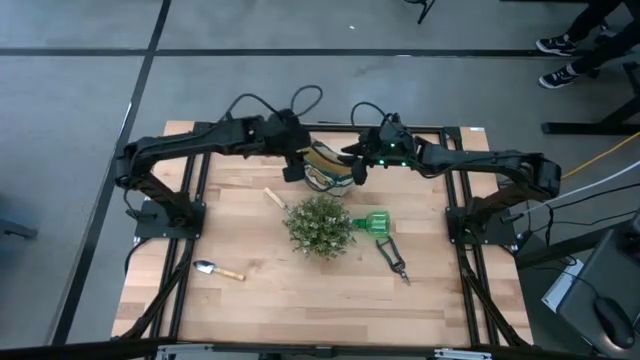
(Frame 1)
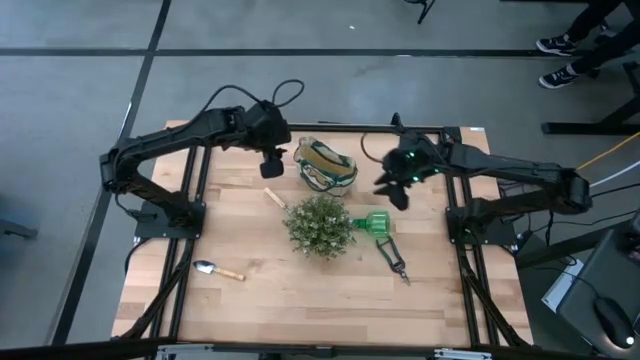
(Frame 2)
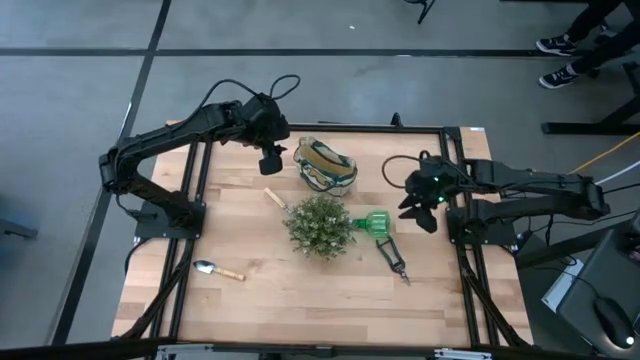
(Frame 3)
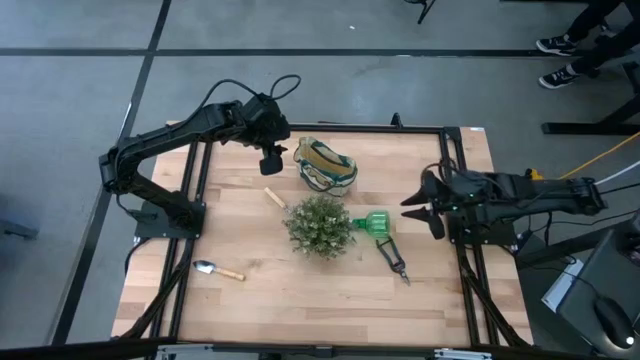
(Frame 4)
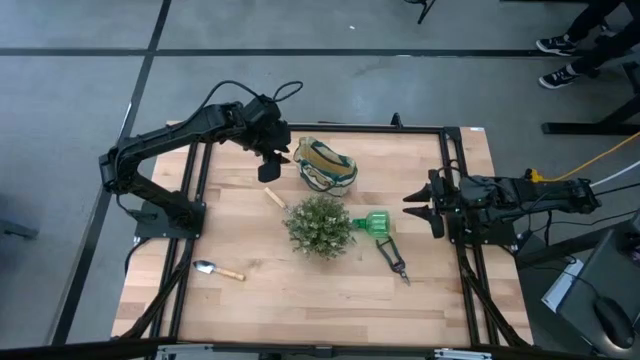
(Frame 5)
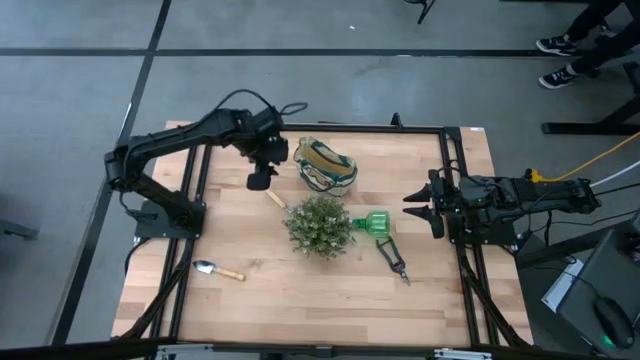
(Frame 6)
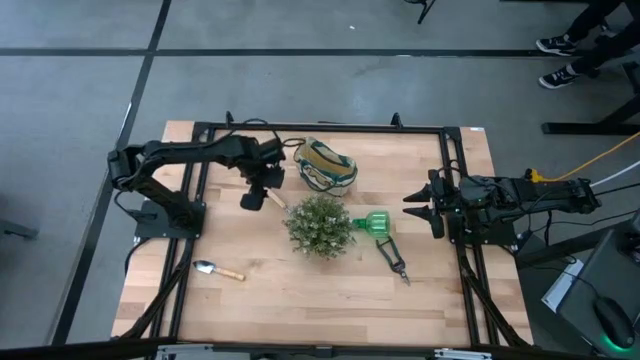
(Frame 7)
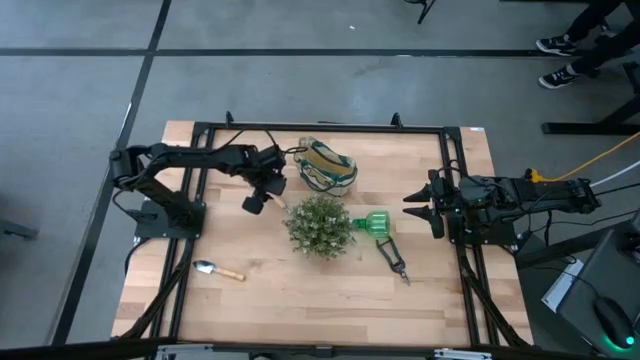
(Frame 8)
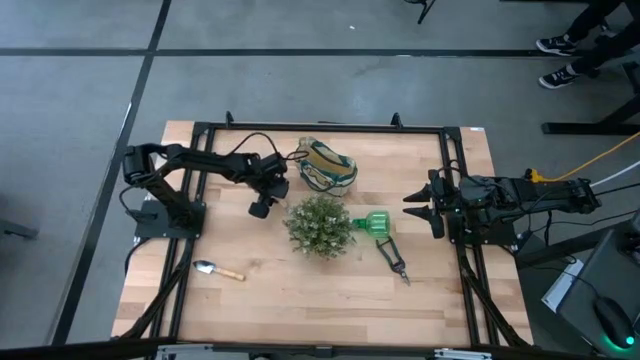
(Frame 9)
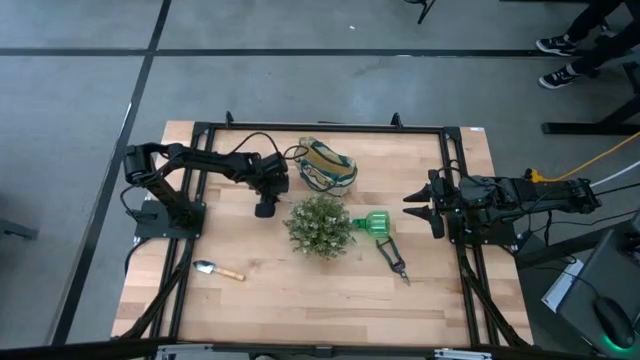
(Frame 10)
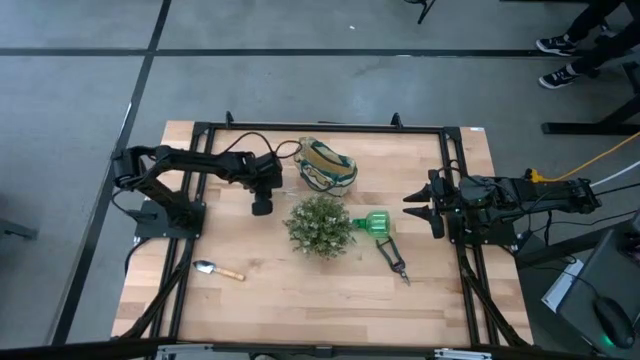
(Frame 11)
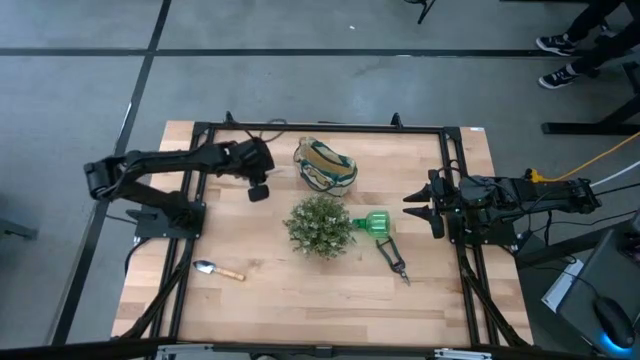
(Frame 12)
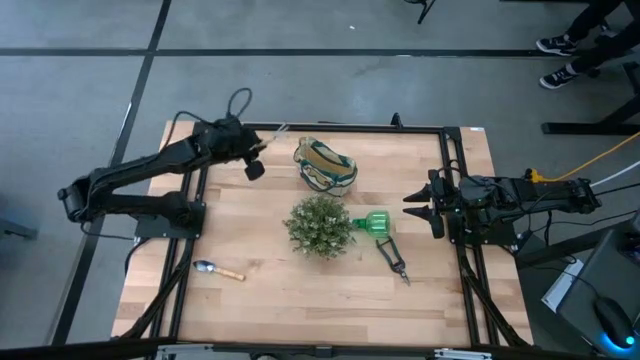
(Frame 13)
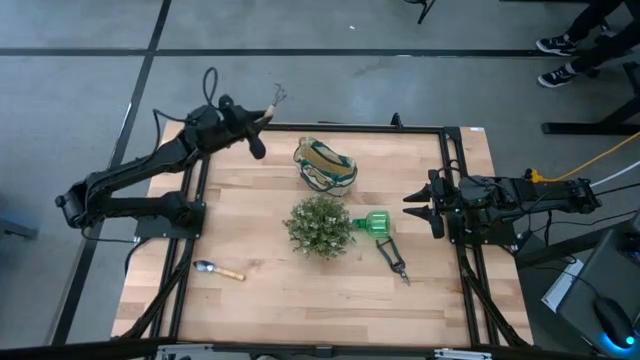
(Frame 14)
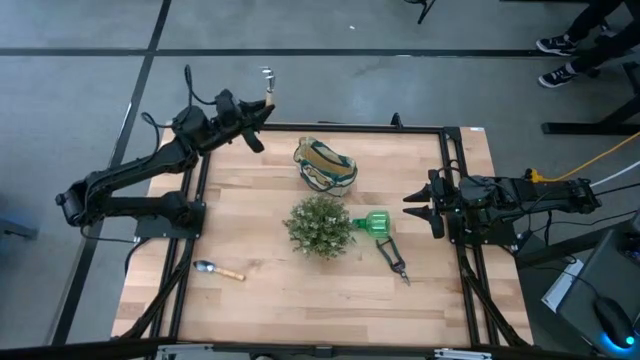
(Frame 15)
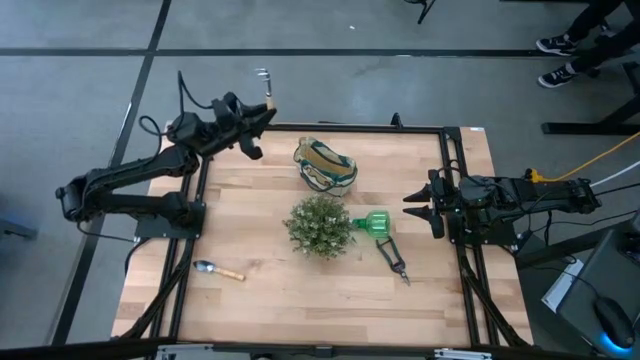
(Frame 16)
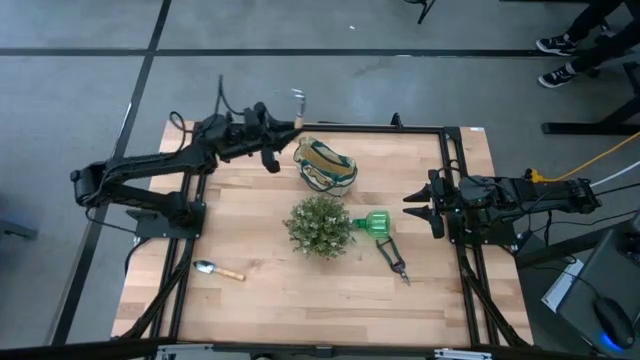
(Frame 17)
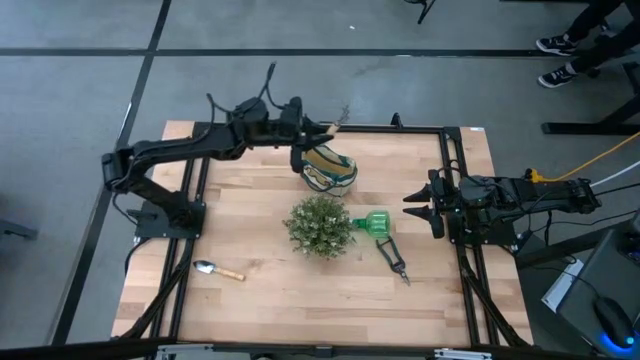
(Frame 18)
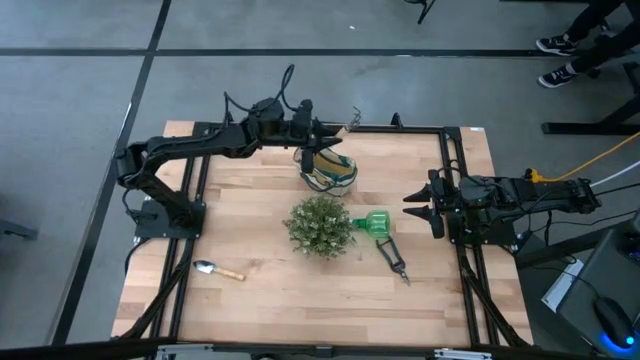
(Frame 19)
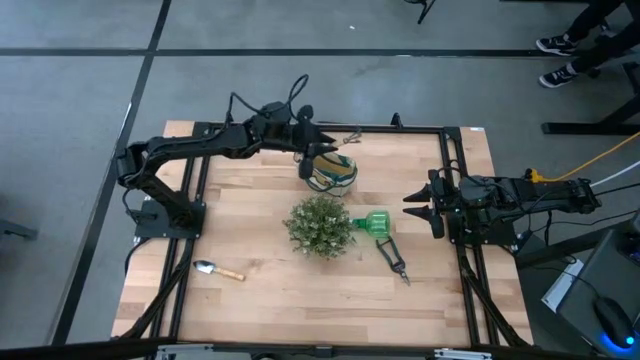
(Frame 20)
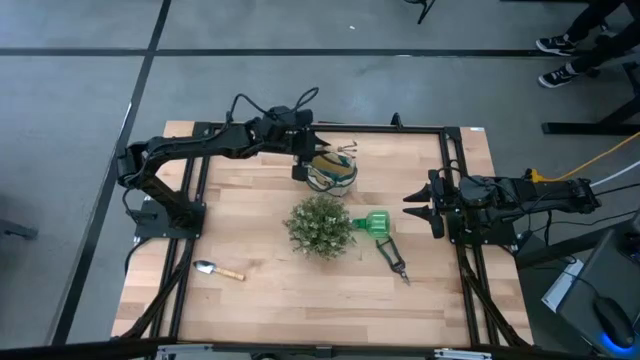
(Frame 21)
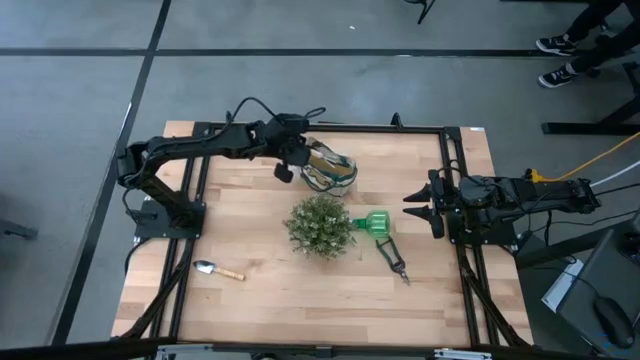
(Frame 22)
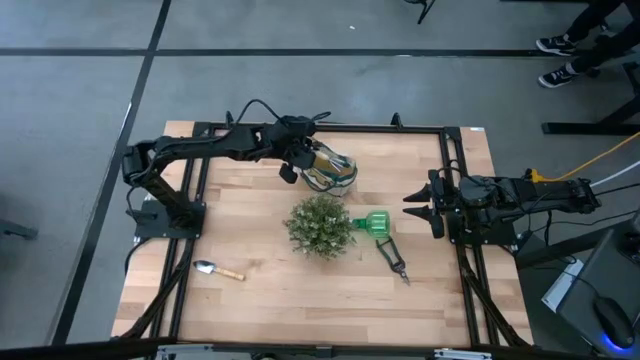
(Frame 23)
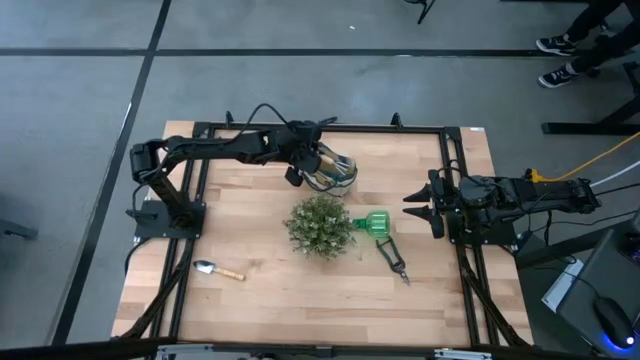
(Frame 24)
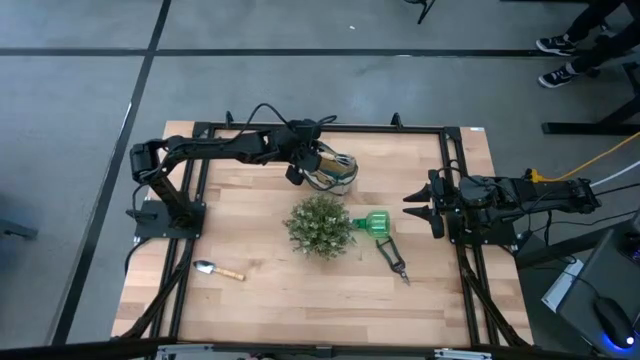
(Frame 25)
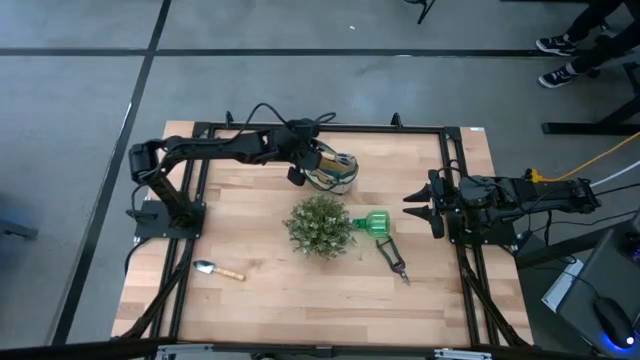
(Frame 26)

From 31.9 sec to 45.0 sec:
Task: Pick & Place Garden tools in Gardening bag
Put the brown hand rake into the green gardening bag

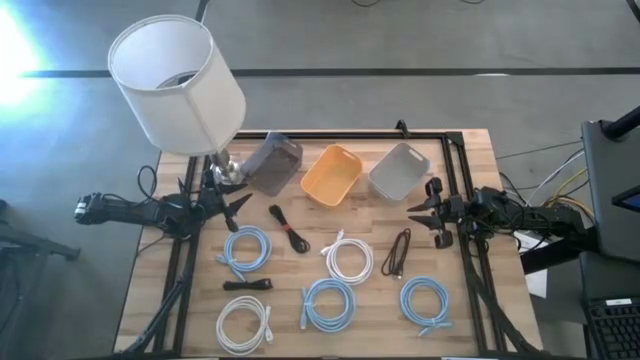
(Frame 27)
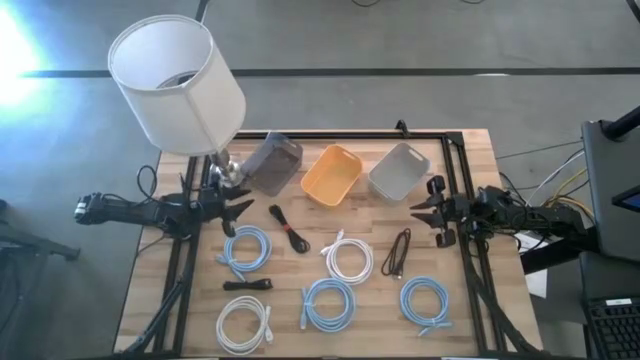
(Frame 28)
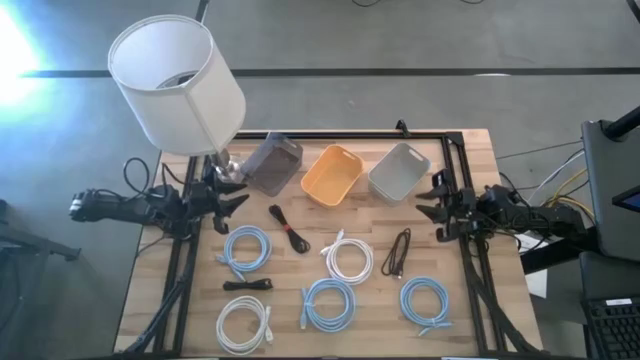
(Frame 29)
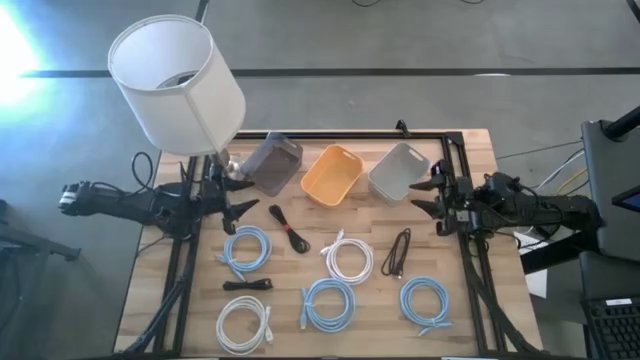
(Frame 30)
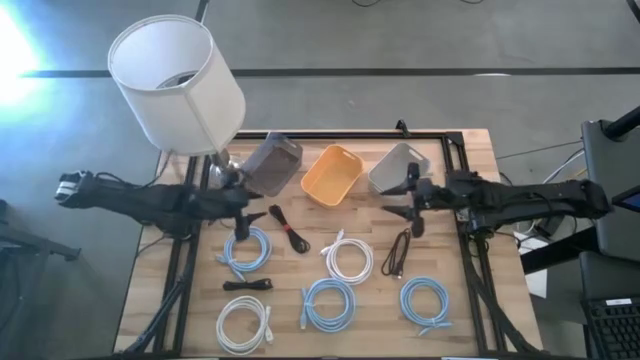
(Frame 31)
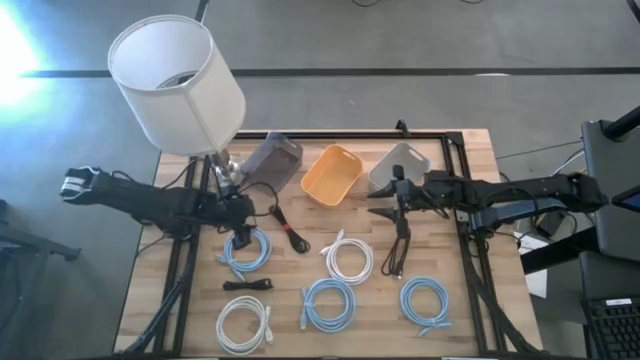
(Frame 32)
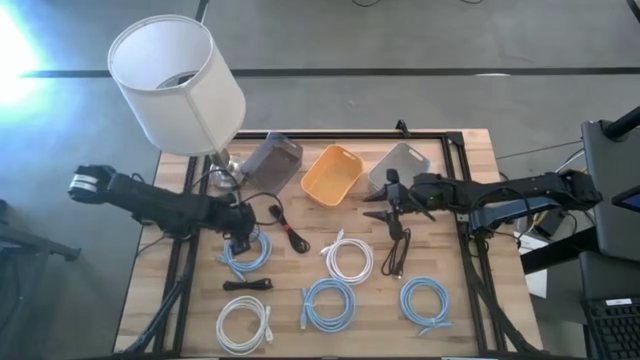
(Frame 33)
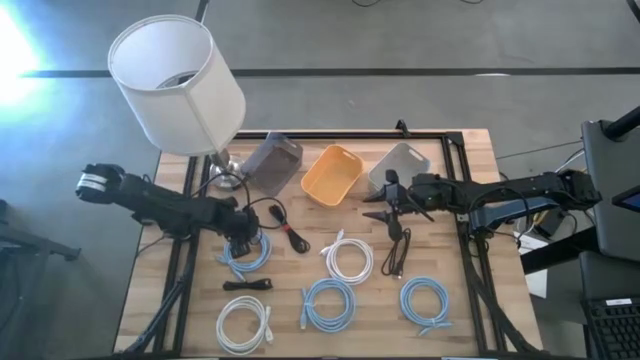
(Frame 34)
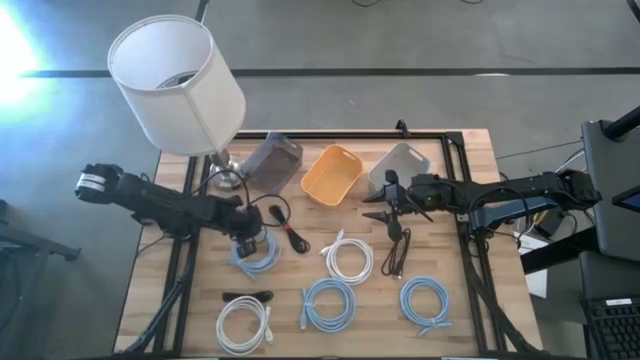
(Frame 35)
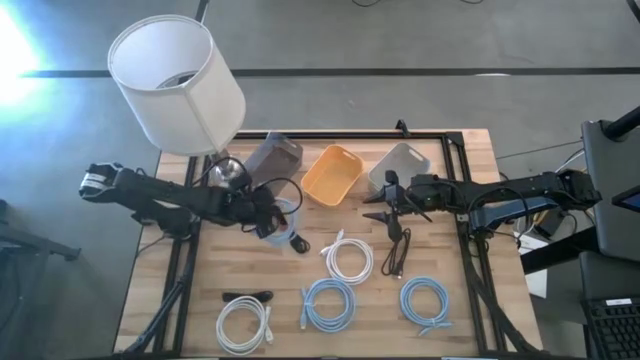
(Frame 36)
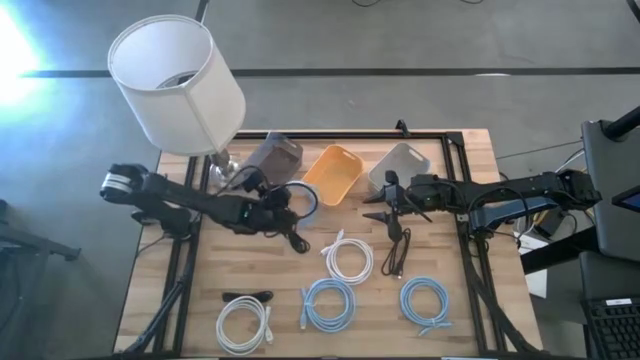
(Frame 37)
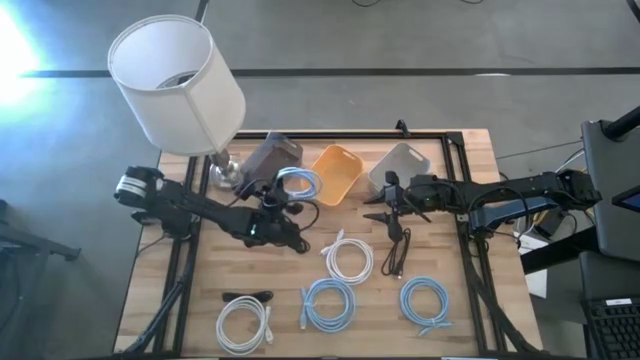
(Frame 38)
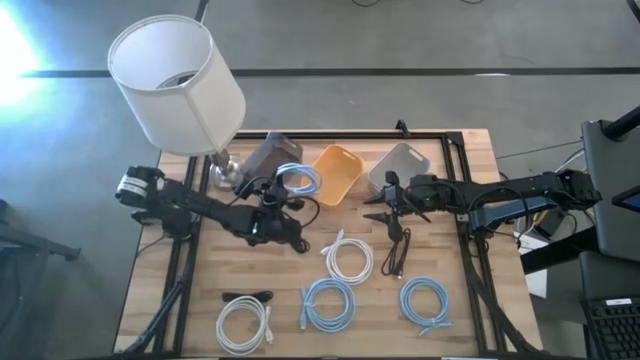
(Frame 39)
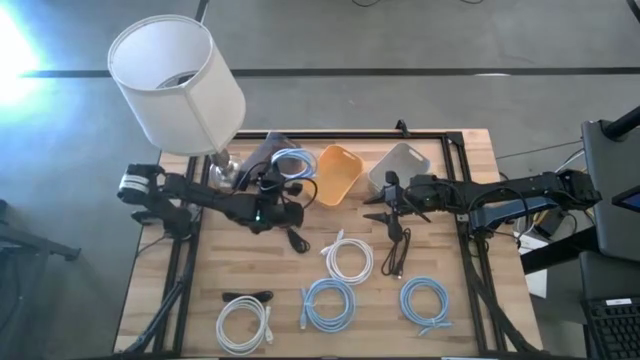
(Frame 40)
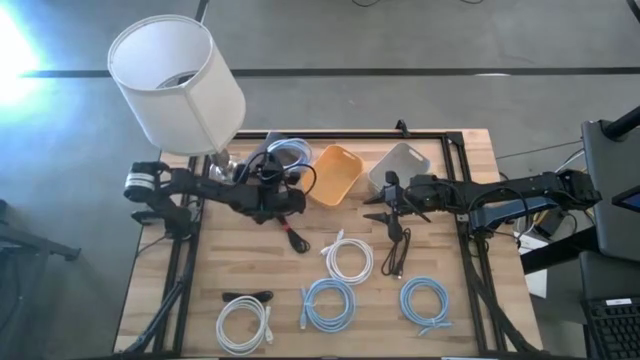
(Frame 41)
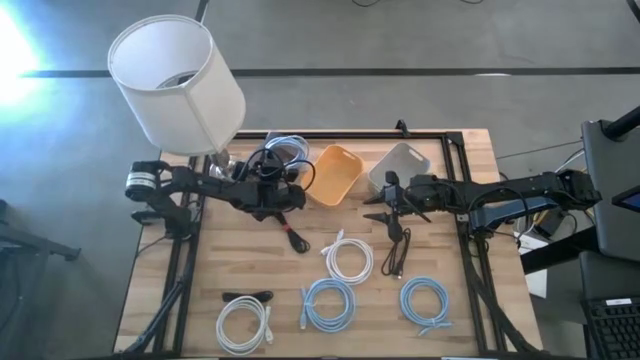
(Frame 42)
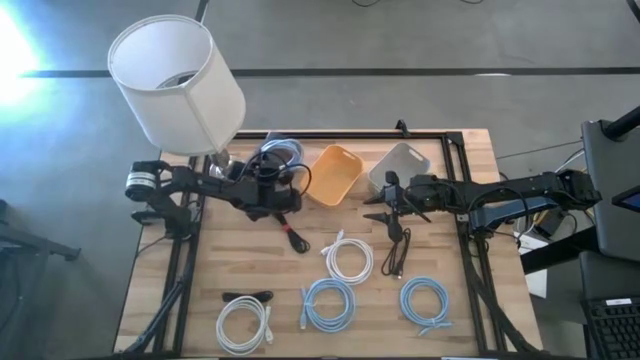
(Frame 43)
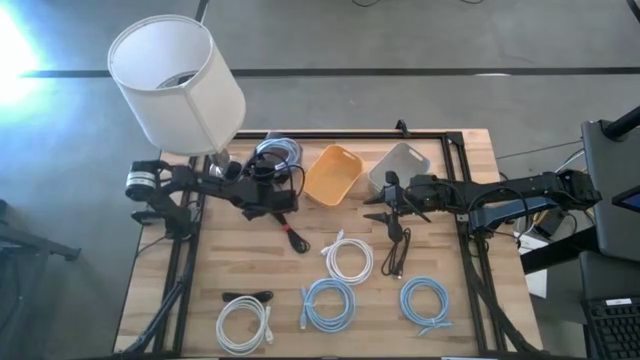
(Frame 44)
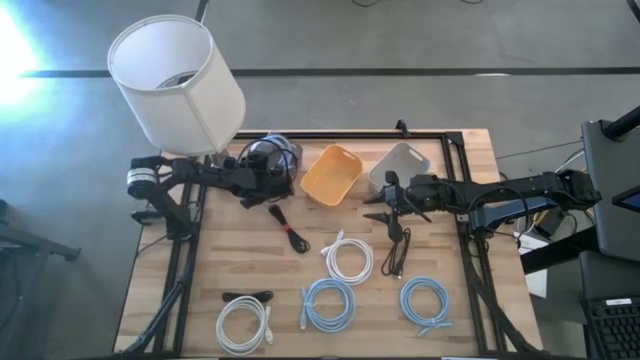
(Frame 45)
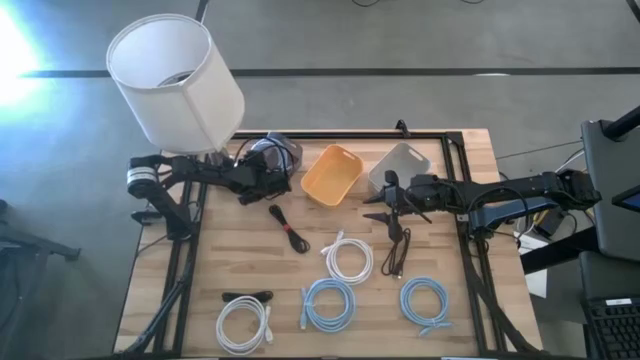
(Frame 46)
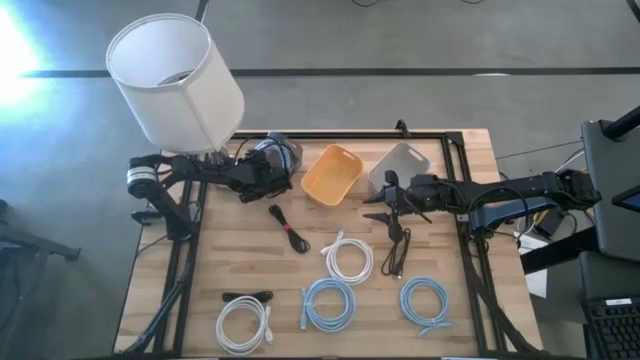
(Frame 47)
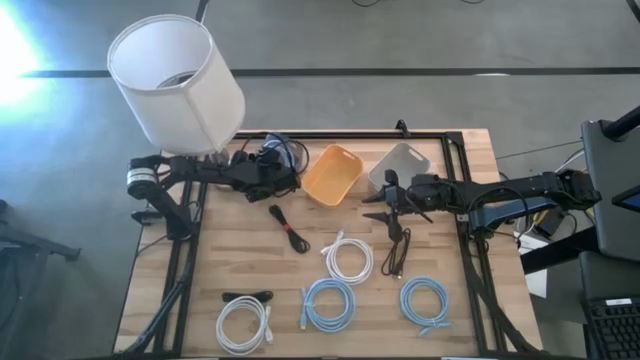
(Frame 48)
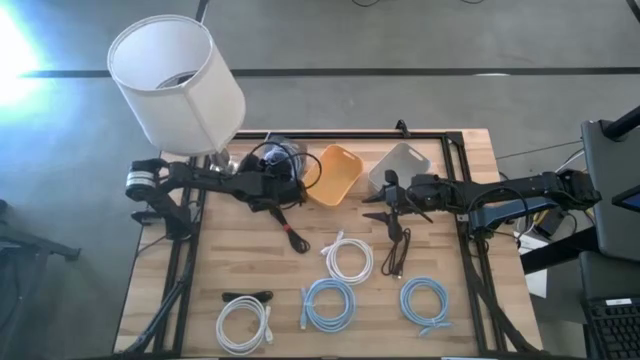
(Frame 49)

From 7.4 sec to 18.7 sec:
Task: Pick & Place USB Port
Put the left blue HDMI cable into the black bin
